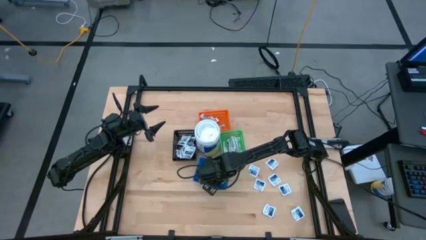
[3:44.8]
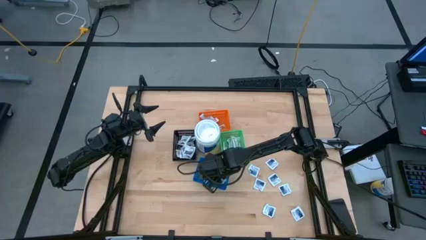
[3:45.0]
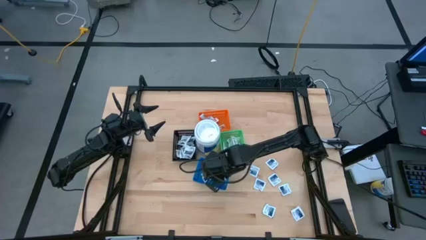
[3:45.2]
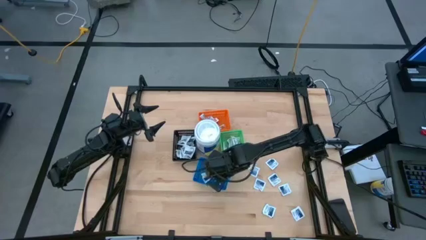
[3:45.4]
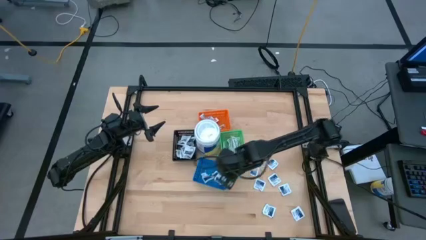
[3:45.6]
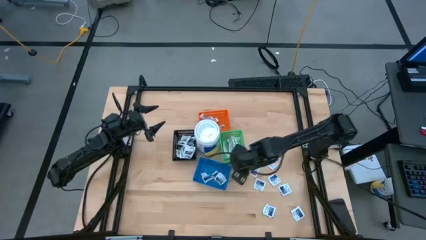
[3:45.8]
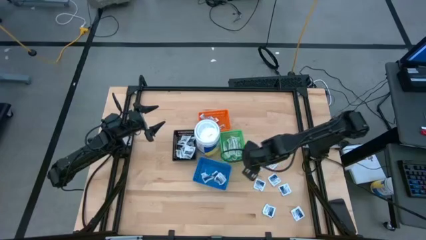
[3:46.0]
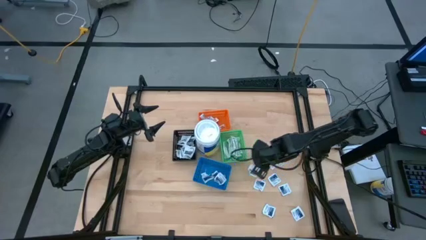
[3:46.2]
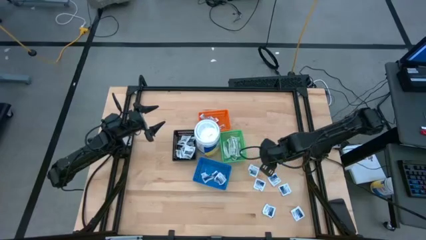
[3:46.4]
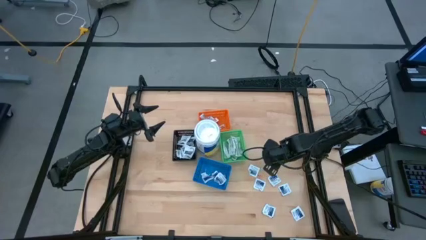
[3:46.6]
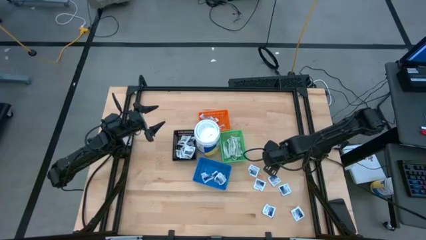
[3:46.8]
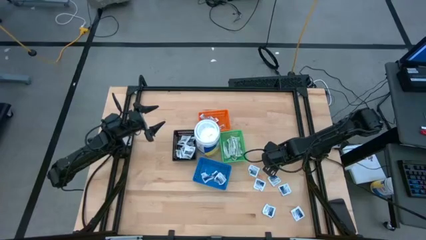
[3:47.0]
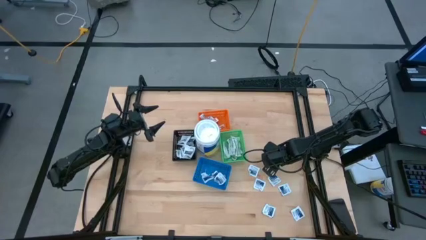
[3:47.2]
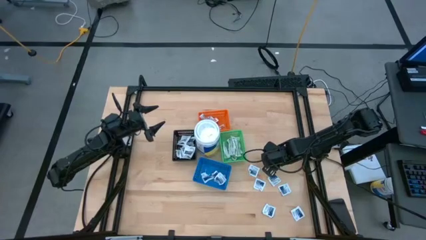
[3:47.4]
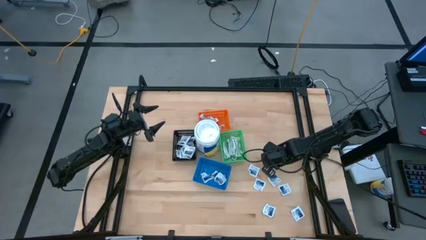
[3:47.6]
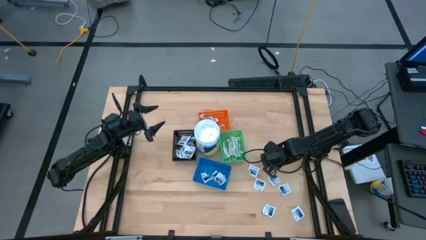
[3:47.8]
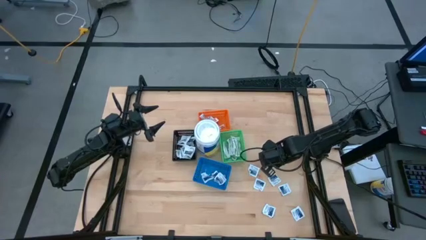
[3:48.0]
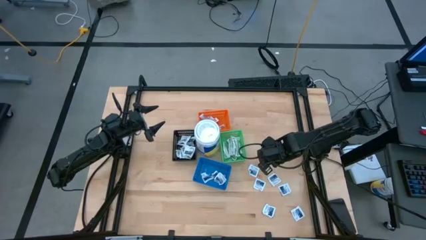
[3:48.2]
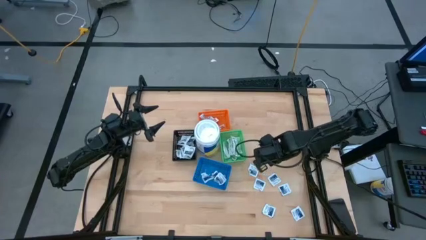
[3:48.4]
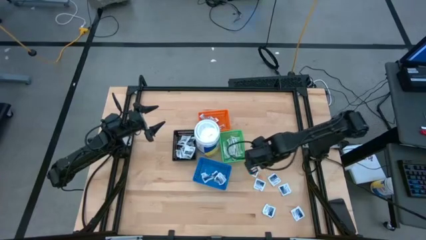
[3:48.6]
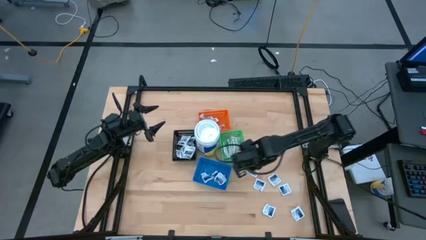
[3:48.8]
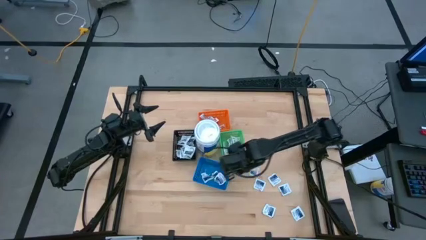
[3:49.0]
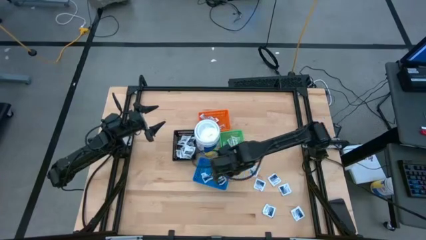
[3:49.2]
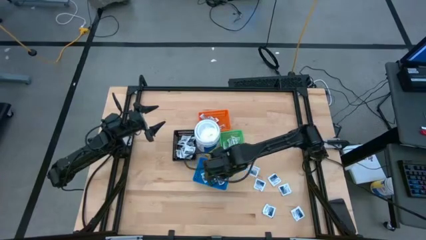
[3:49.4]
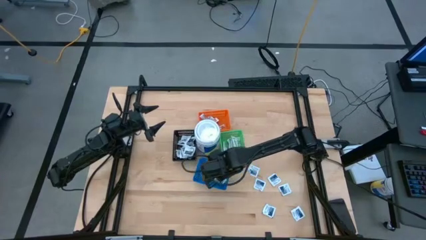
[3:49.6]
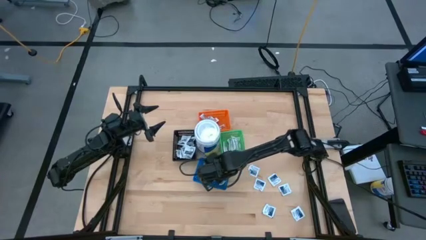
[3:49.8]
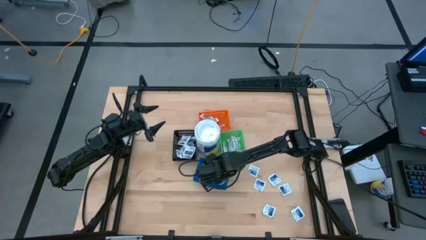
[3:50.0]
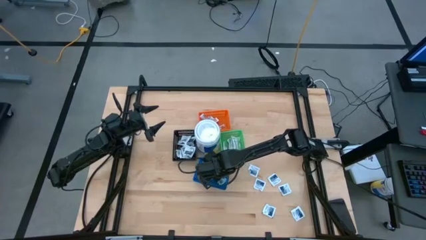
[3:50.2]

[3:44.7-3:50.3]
Task: Pick & Place First Aid Supplies
Put the blue alcohol pad into the blue bin

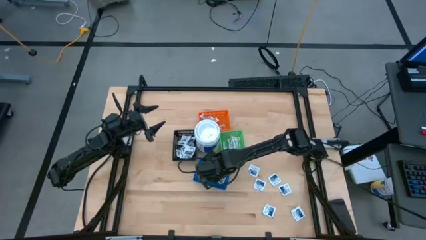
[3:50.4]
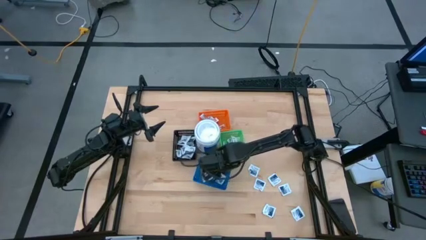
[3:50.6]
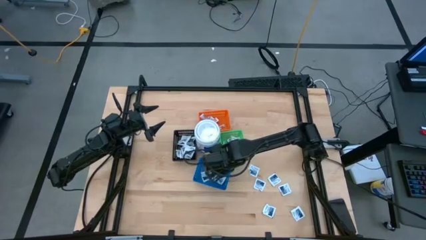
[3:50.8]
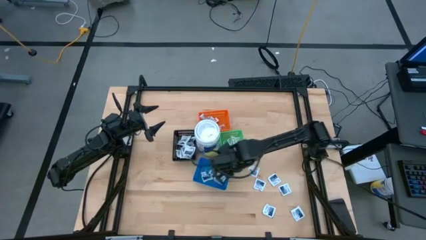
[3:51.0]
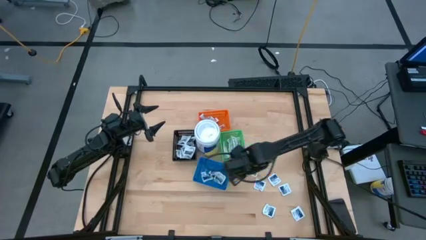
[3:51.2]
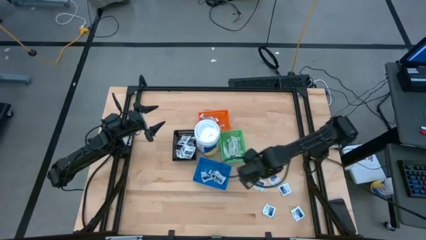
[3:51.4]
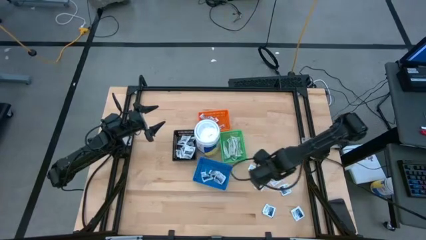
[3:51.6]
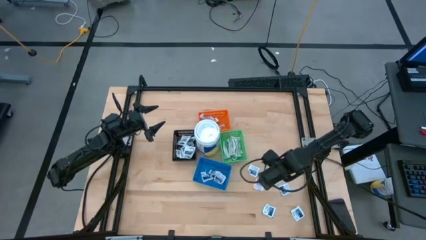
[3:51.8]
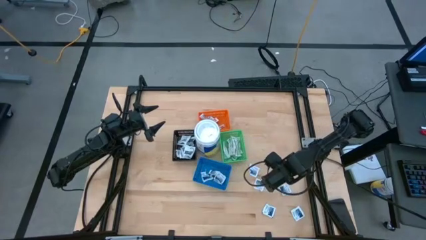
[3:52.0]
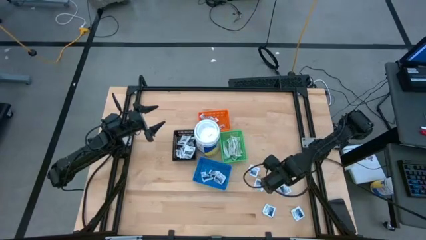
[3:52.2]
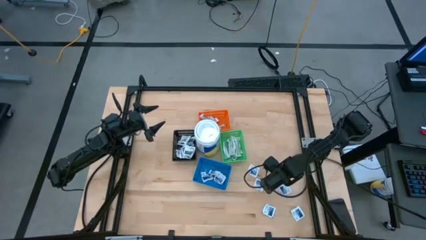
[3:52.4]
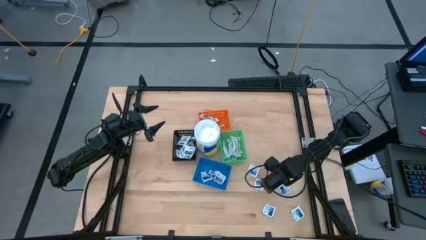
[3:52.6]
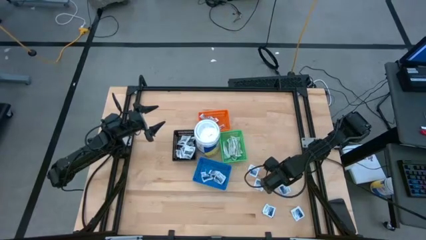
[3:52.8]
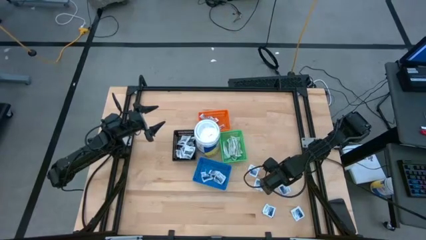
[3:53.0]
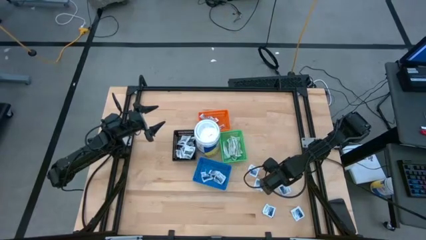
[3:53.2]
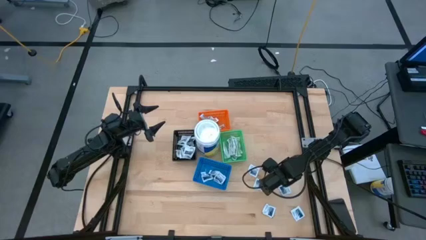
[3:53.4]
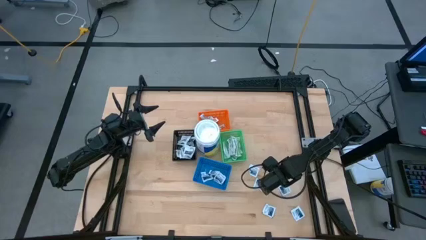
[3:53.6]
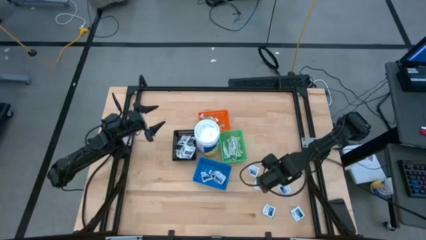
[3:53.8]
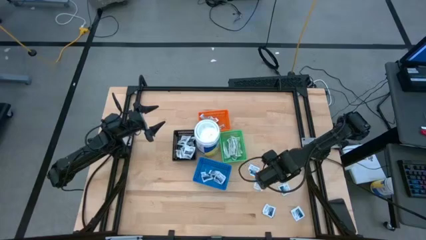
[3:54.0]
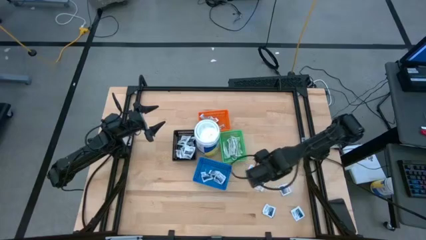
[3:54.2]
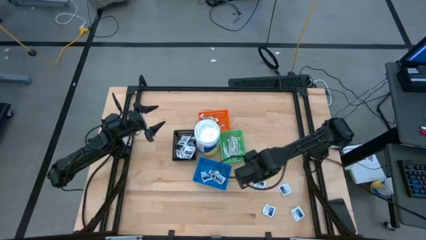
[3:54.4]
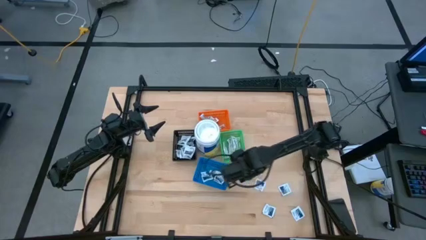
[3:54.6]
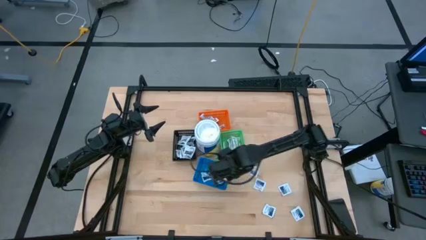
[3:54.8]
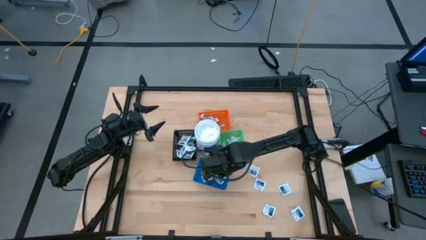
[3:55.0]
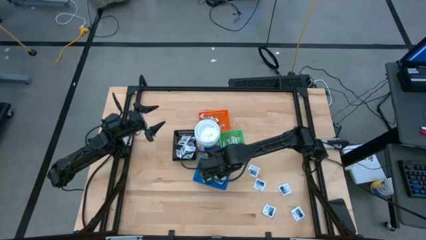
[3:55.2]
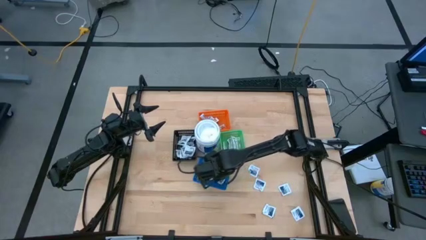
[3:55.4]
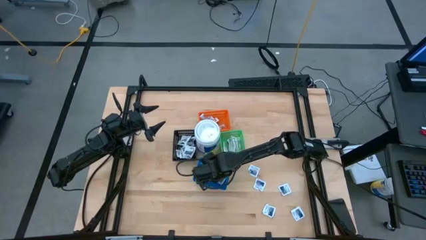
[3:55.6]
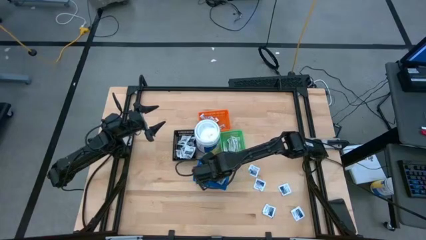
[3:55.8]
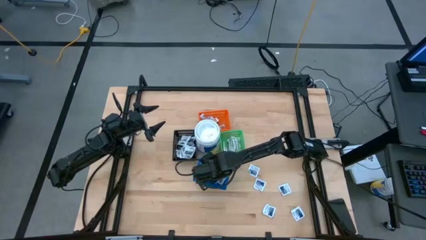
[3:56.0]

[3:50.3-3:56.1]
Put the blue alcohol pad into the blue bin

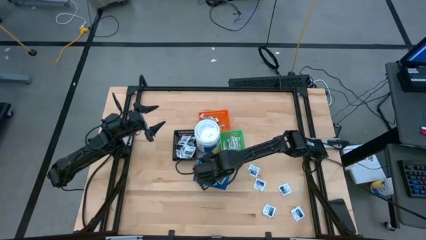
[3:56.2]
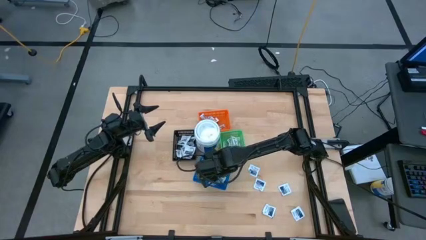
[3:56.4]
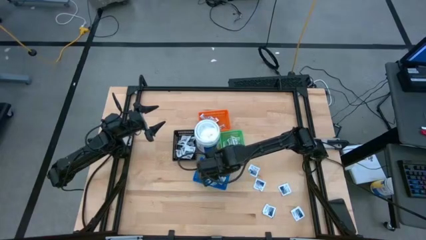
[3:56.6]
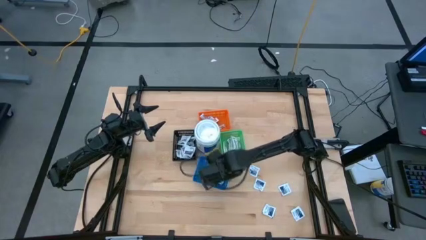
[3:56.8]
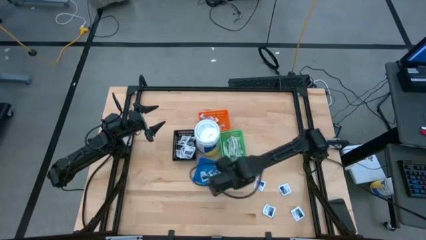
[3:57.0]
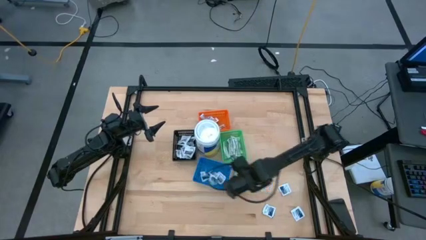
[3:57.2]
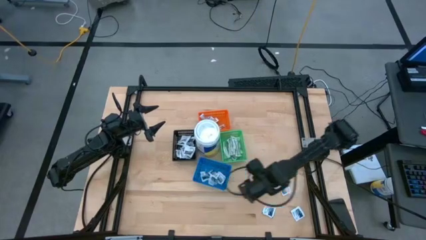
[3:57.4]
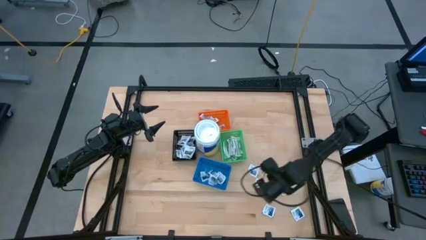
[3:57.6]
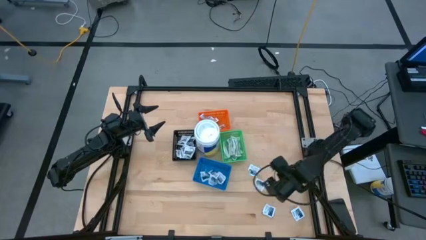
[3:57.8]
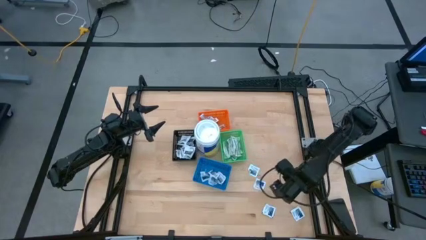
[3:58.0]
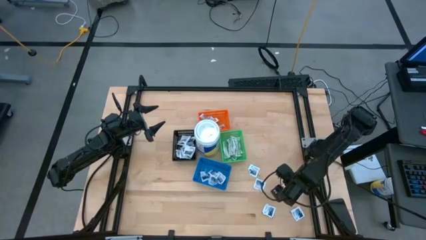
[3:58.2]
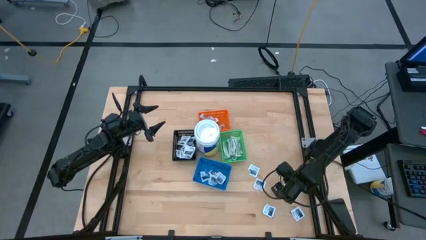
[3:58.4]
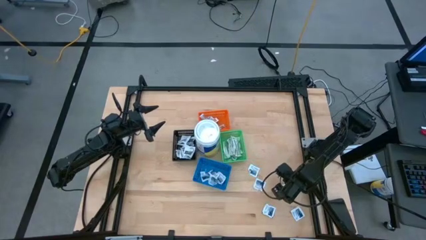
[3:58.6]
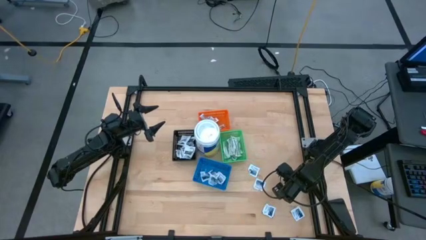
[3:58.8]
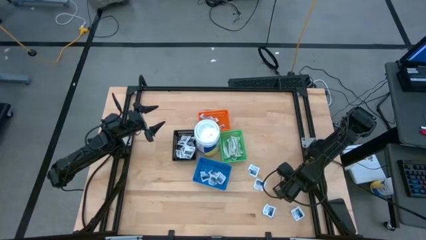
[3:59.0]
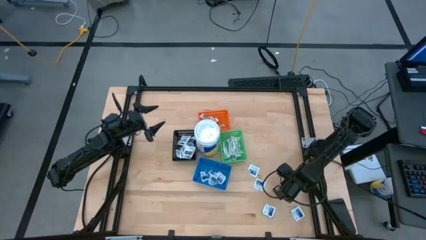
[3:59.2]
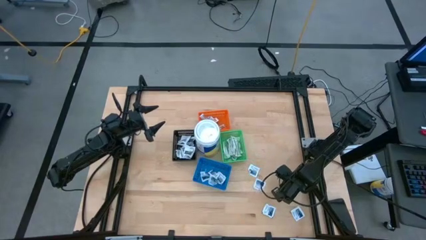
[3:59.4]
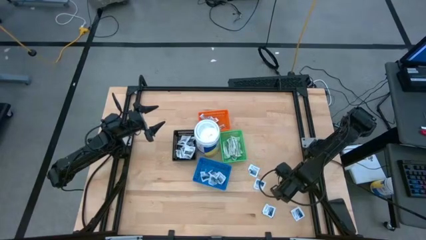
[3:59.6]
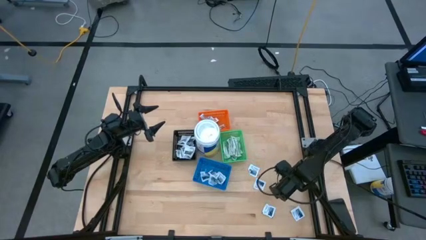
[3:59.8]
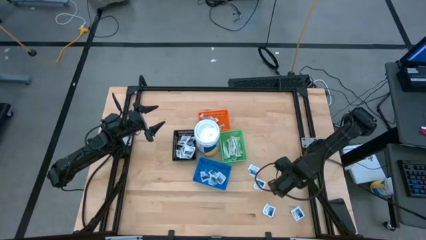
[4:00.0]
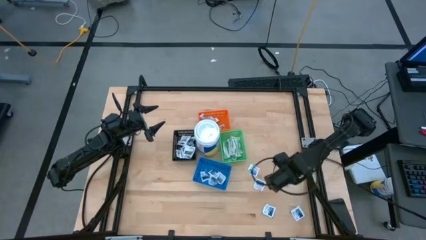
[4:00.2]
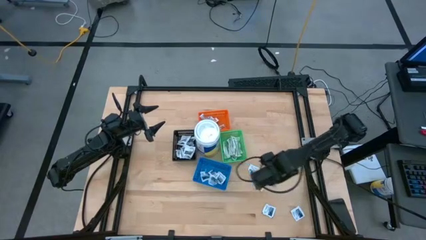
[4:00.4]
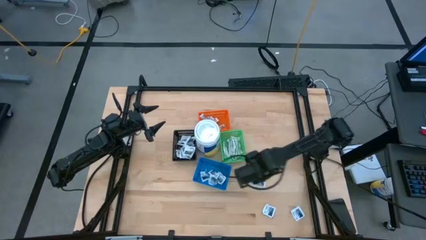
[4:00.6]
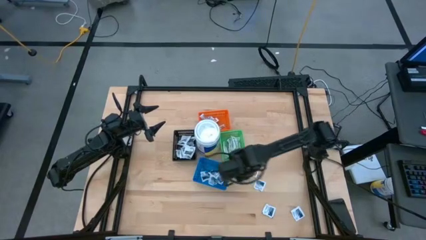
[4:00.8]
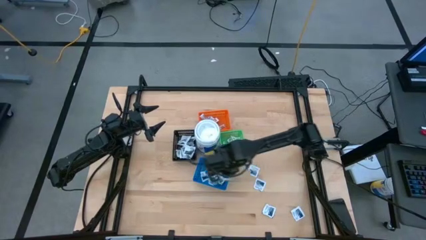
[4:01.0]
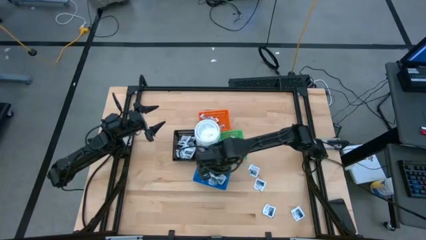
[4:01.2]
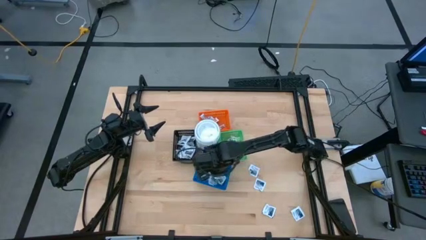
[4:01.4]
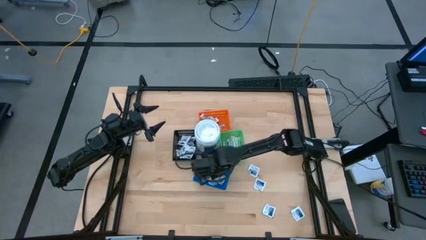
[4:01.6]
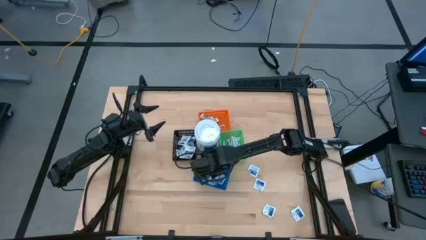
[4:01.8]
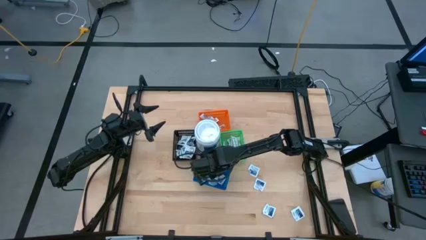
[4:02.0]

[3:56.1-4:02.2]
Put the blue alcohol pad into the blue bin
